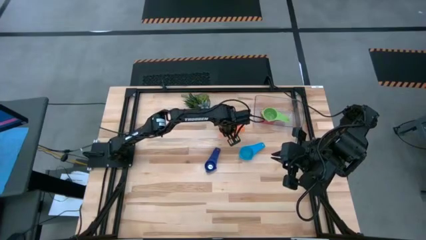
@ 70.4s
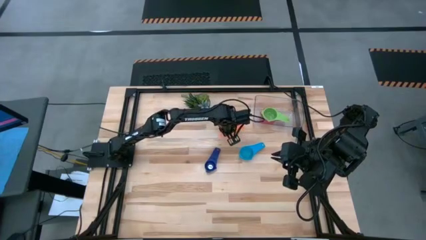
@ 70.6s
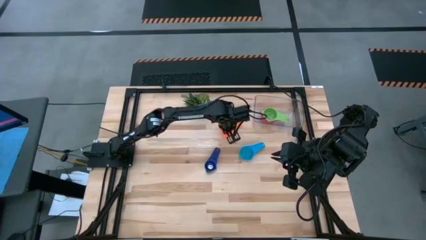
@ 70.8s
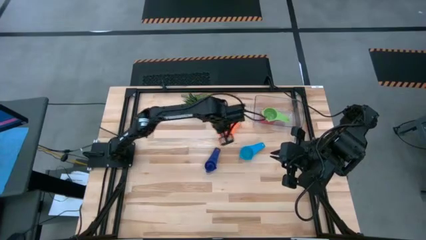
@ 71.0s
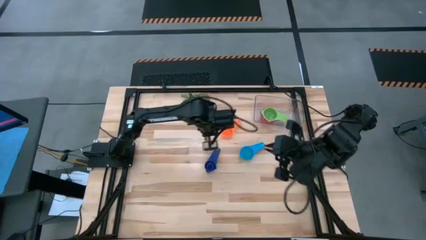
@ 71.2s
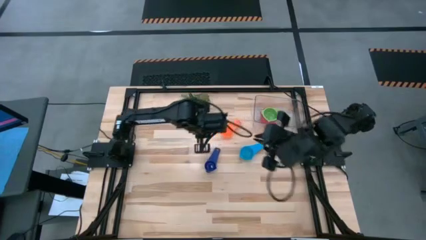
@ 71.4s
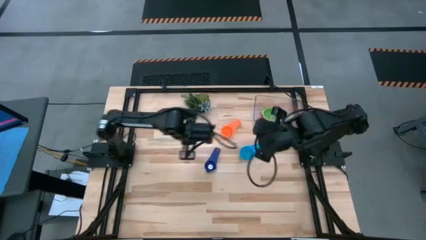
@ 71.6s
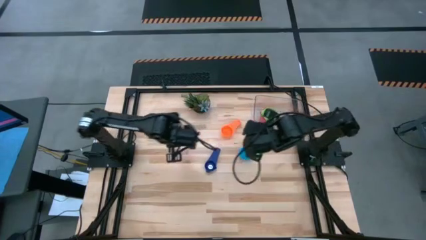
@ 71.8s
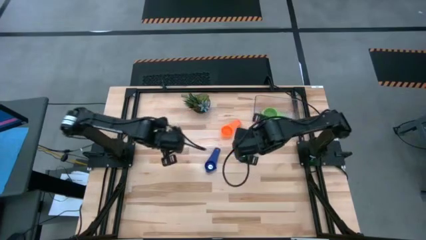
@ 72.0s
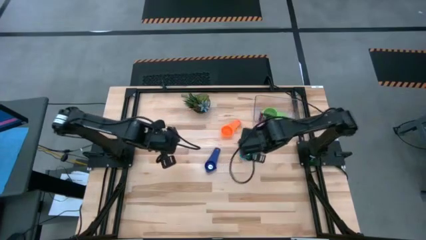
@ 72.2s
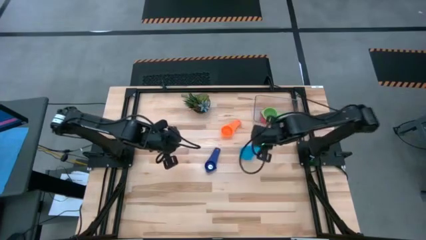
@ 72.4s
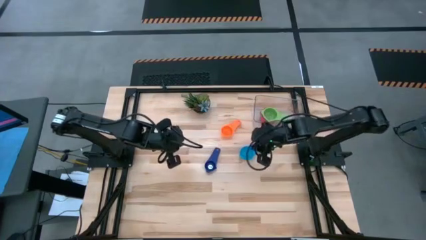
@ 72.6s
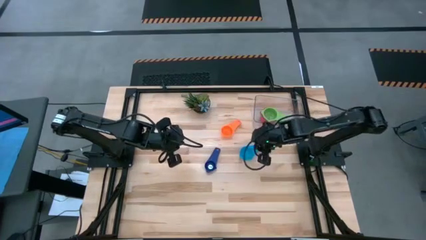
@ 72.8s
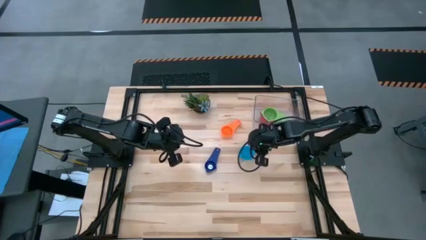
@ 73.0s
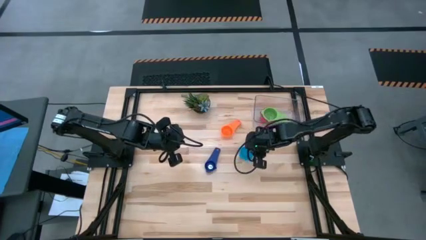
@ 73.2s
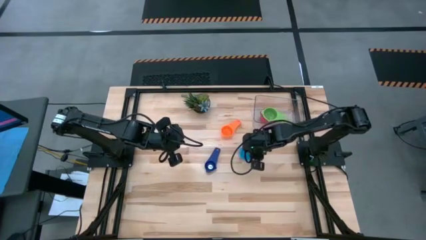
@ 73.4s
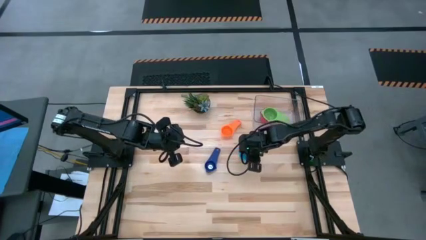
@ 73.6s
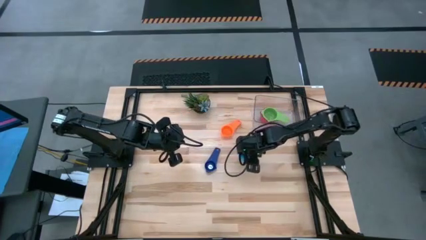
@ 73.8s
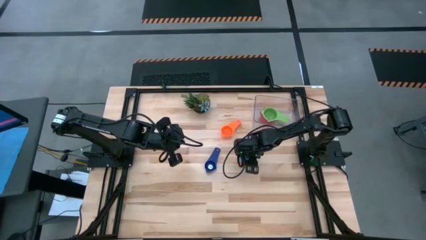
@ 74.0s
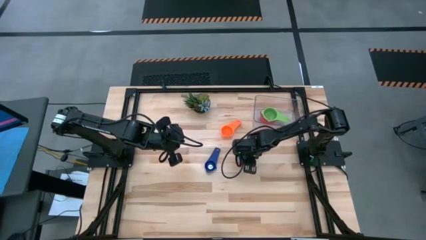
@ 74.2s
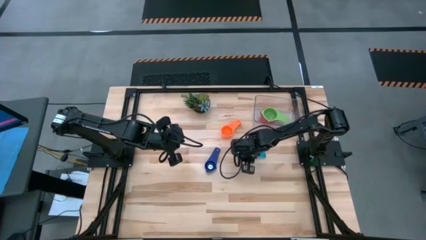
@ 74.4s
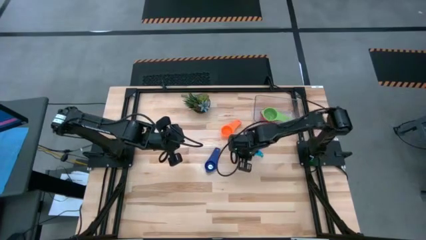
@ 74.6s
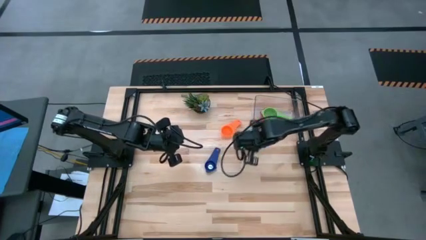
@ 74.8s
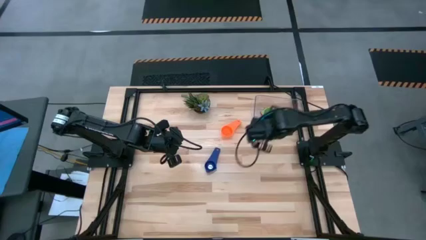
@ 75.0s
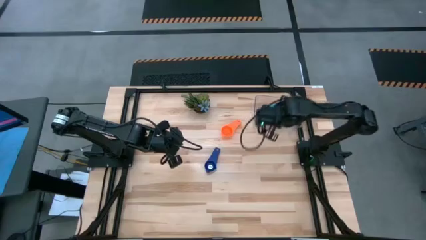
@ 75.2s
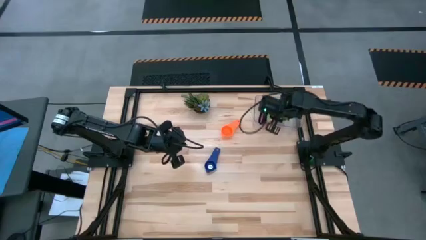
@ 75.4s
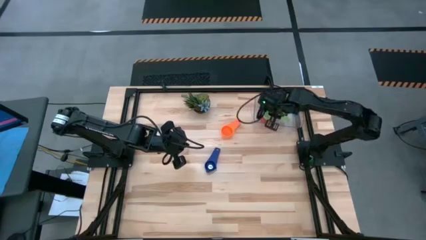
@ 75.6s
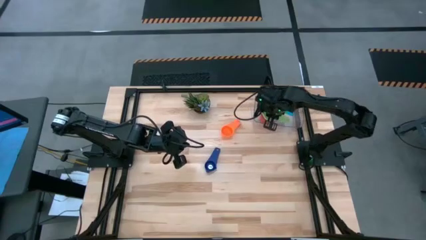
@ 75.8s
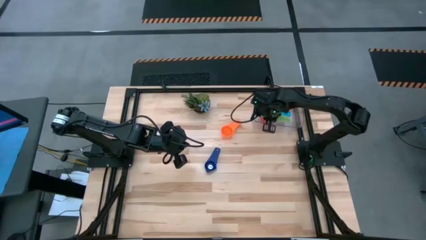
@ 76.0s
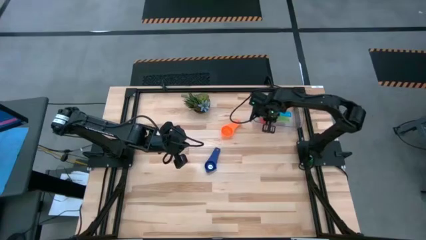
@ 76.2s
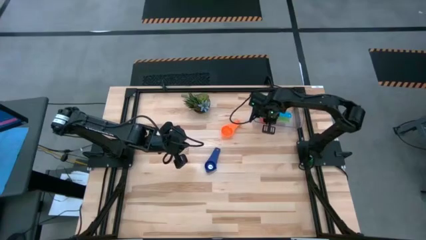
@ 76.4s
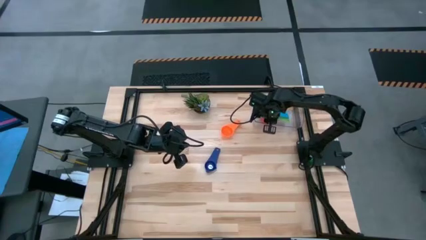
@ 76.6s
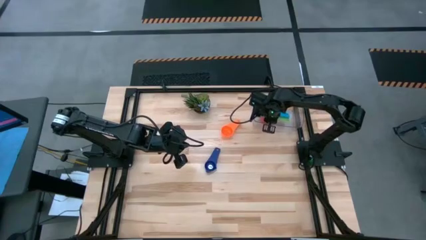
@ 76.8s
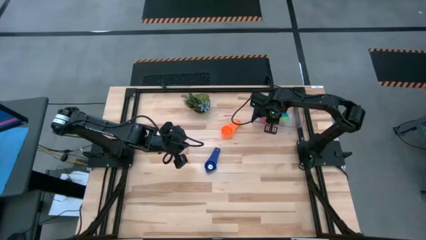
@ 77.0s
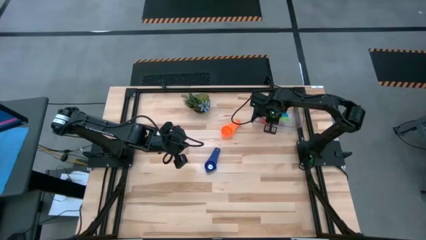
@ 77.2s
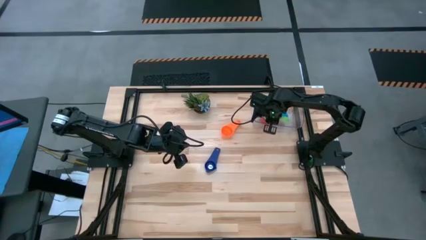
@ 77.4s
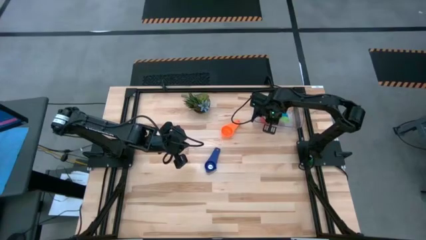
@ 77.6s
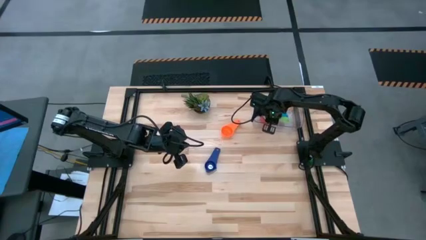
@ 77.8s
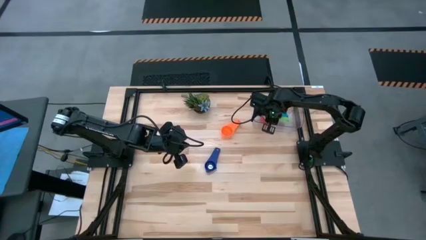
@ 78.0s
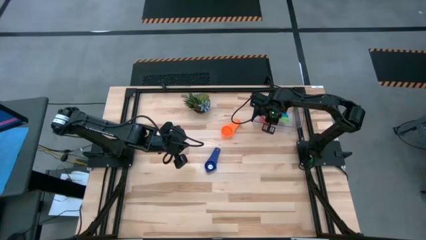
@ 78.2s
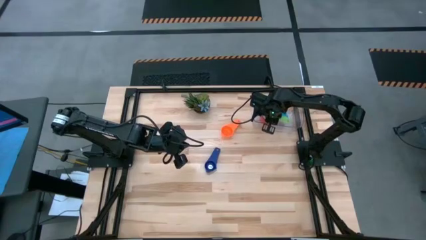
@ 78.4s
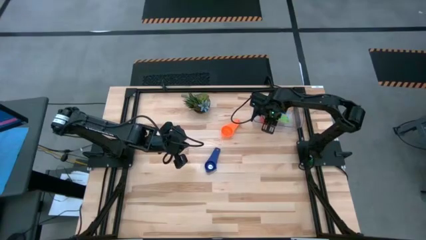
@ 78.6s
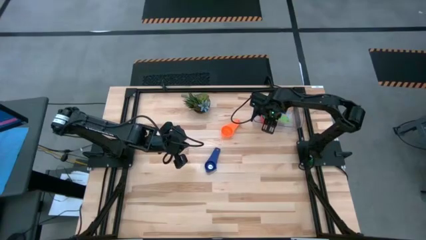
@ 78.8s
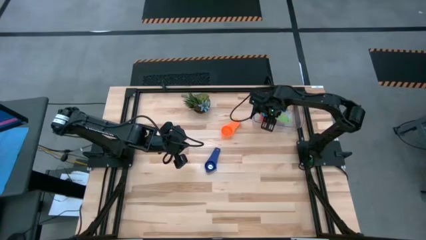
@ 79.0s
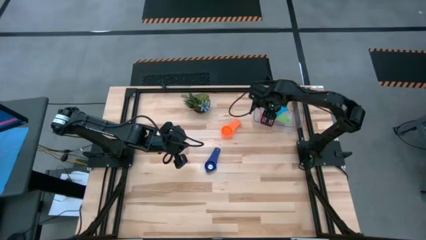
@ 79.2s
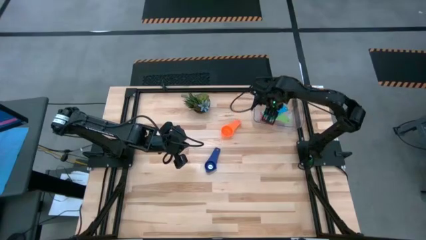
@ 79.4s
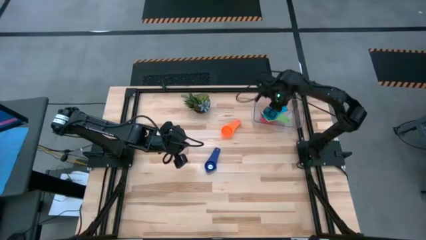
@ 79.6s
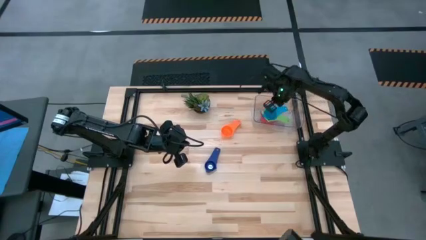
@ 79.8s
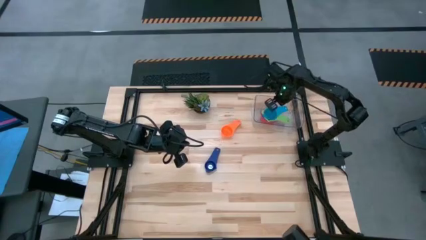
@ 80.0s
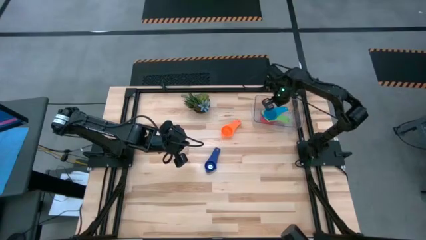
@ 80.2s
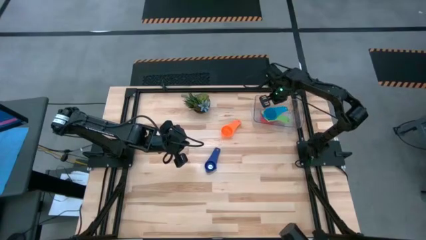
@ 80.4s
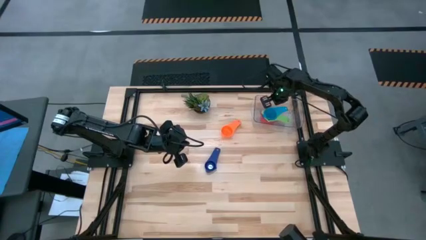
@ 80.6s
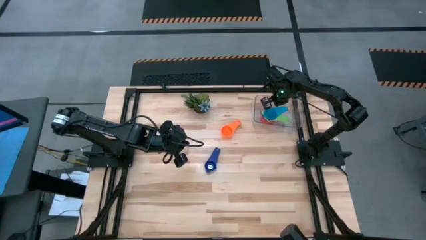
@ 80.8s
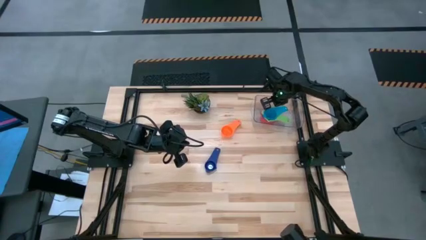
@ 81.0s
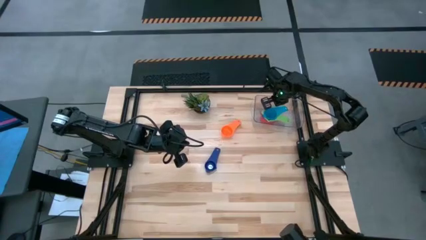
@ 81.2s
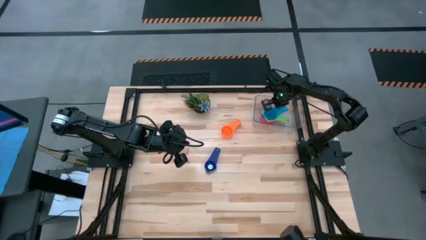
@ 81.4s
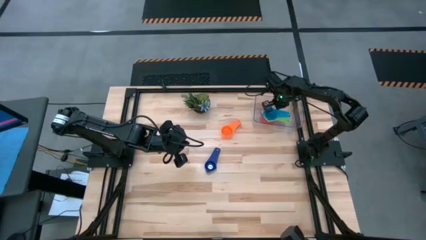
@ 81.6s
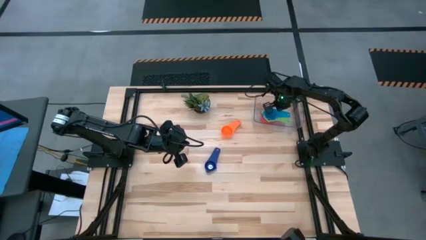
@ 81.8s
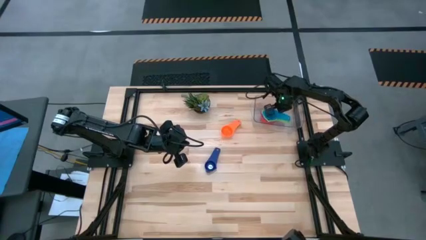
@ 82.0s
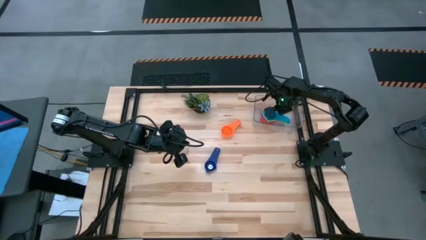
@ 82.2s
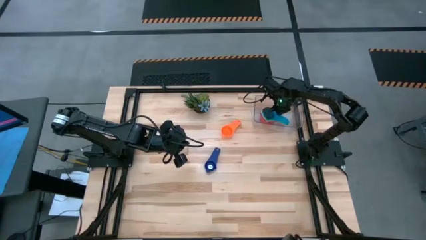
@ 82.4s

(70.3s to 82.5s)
Task: Nest measuring cups in basket
Stack the light blue measuring cup on top of the green measuring cup in the transparent bin

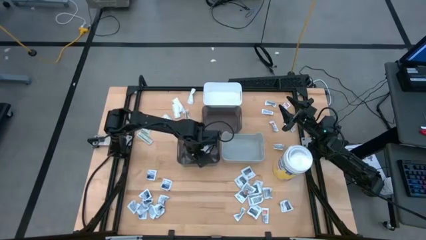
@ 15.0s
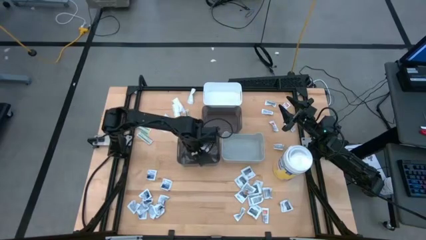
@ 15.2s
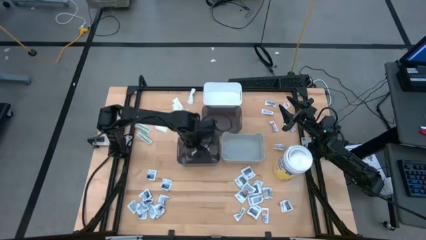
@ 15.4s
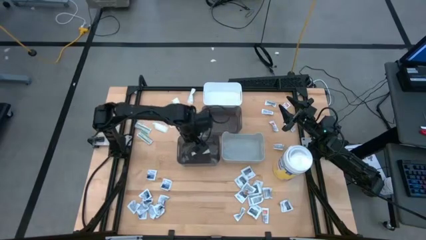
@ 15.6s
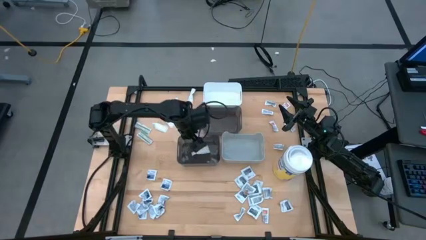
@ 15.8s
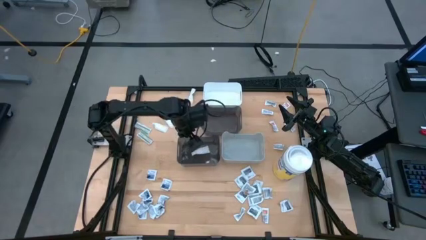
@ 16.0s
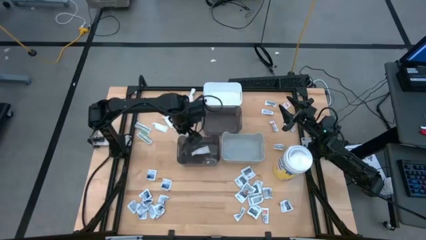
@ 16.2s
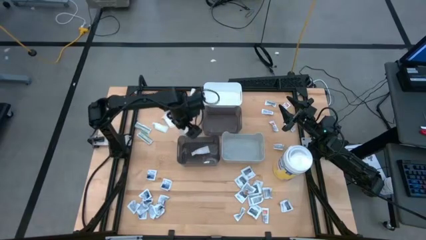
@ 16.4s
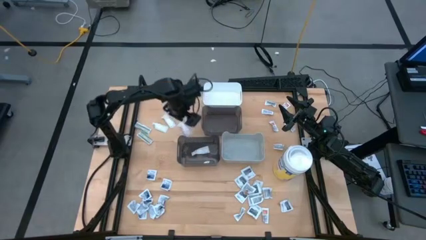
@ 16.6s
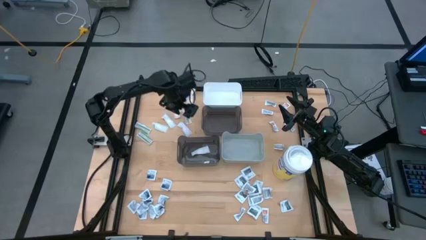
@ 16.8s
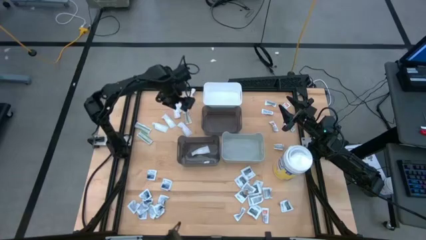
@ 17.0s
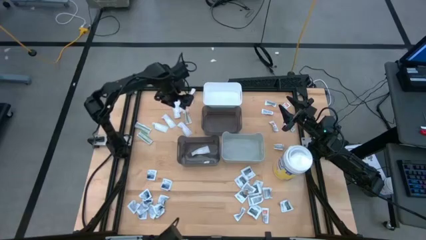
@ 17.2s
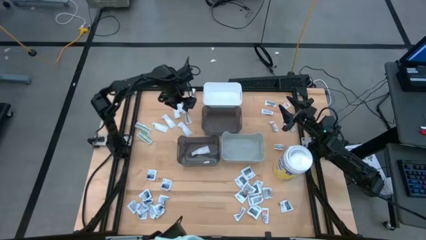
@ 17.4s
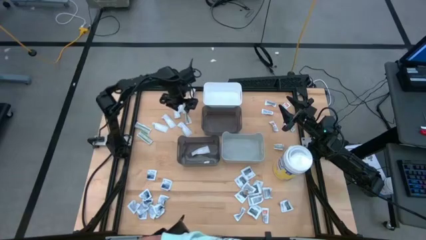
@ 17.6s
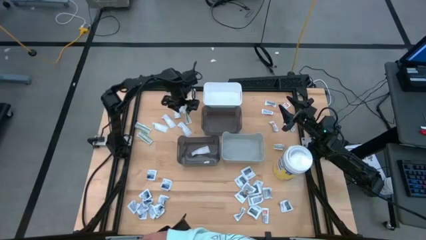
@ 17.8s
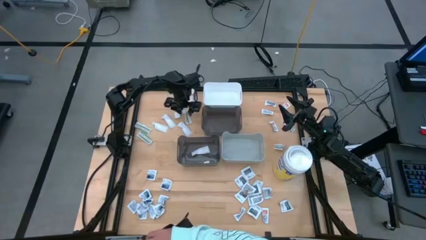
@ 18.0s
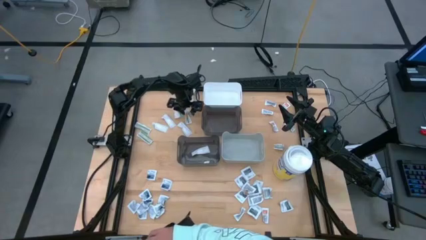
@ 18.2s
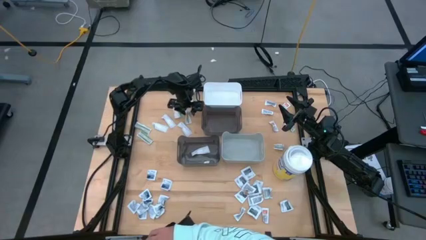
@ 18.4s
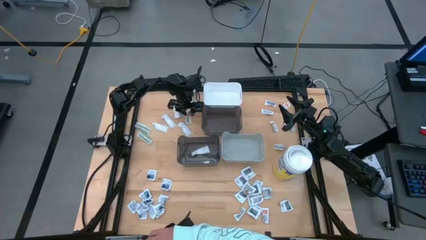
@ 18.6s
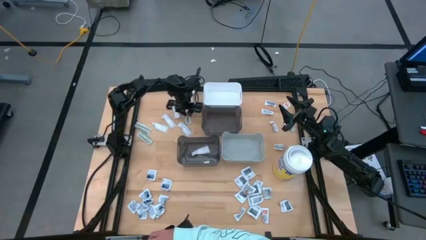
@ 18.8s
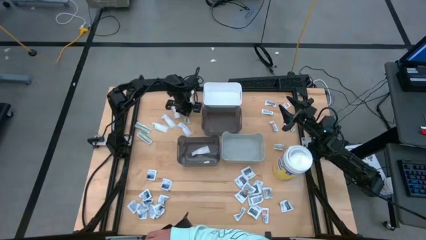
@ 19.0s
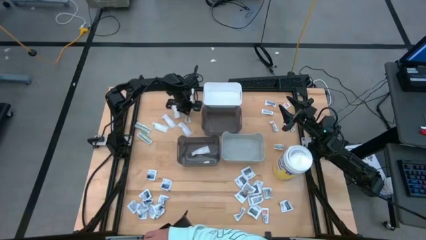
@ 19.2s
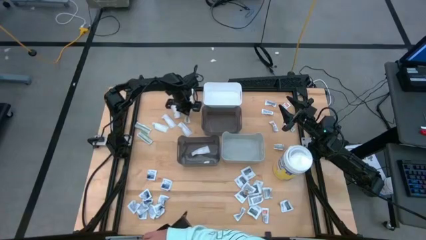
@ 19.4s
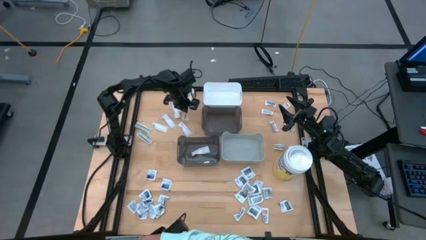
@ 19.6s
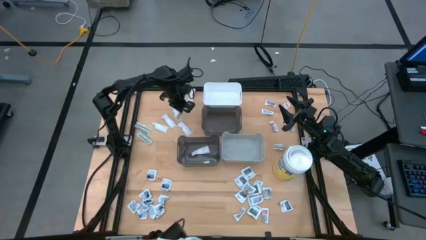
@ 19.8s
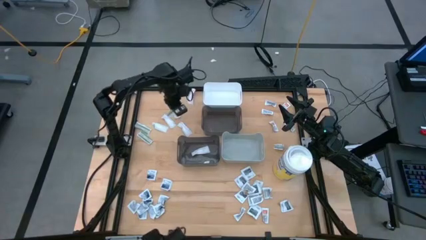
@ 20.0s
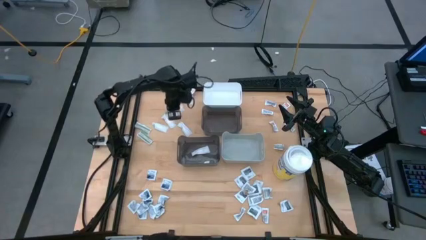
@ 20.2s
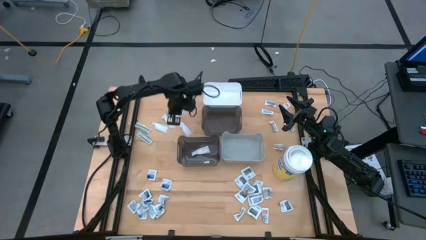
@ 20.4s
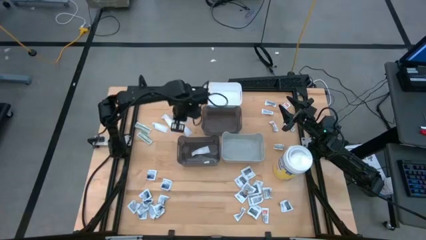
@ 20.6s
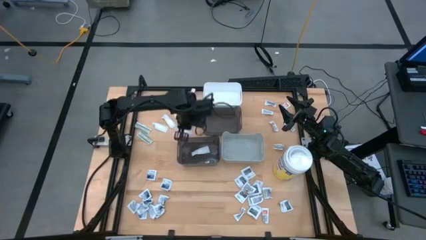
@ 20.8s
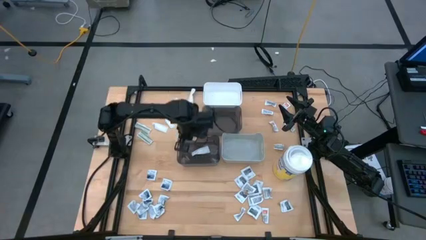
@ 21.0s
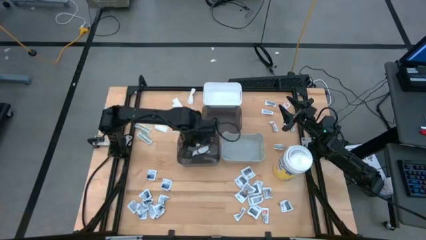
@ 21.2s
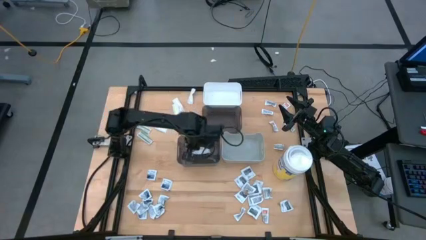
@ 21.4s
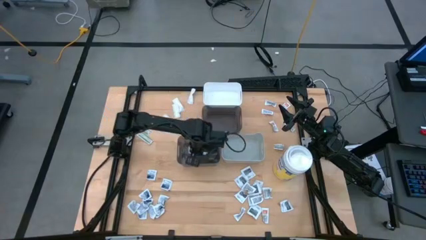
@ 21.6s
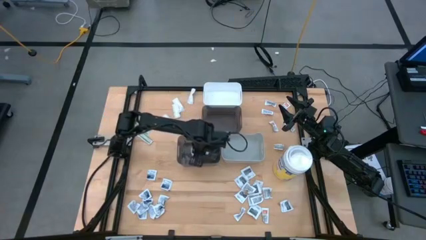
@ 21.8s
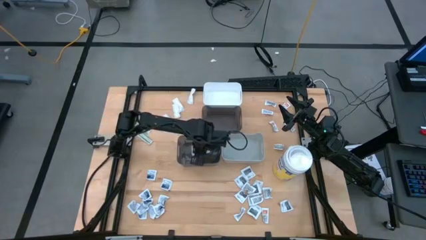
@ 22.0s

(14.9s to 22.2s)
Task: Pick & Place First Aid Supplies
Put the white bandage into the bottom black bin
